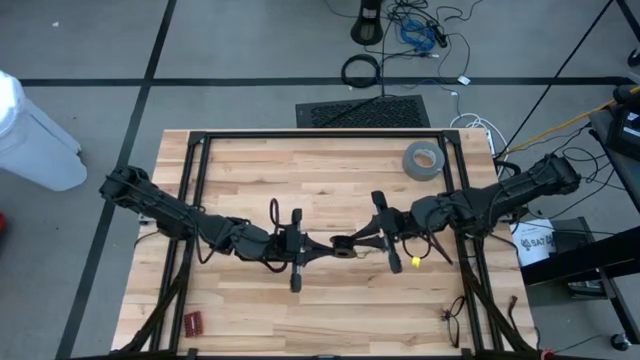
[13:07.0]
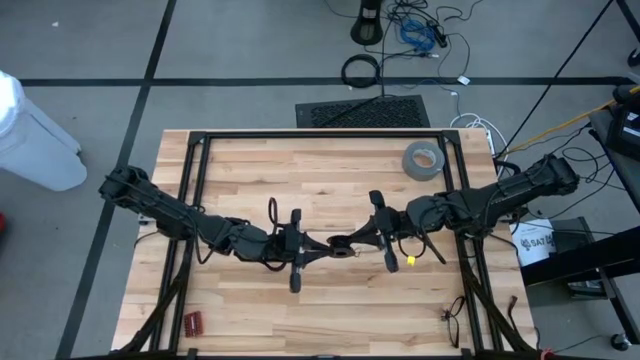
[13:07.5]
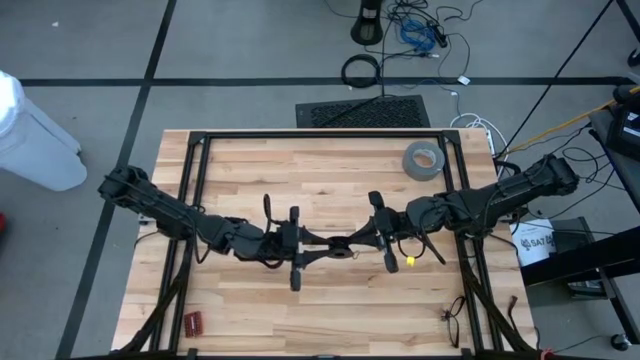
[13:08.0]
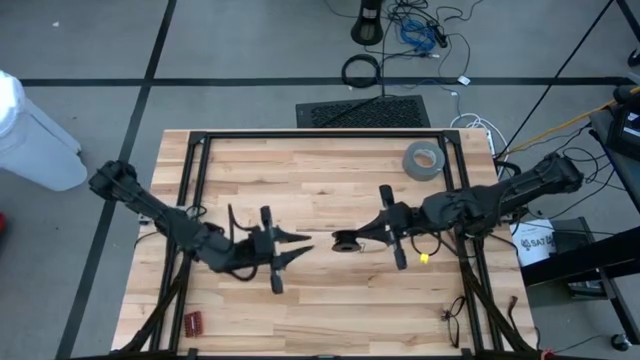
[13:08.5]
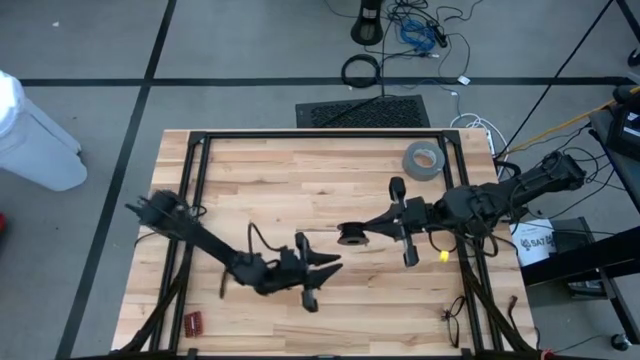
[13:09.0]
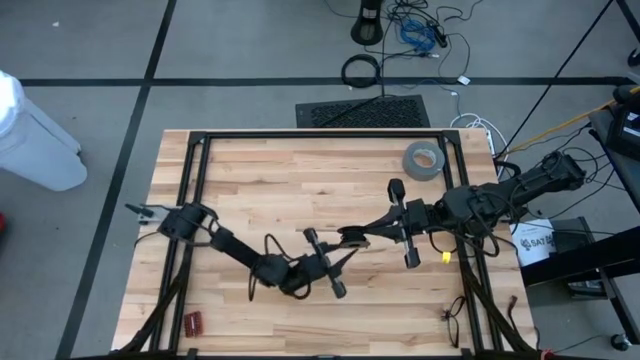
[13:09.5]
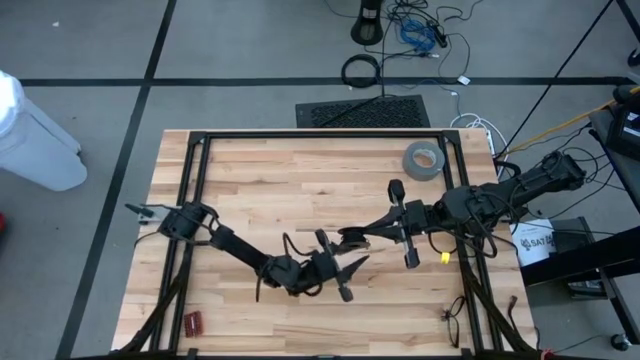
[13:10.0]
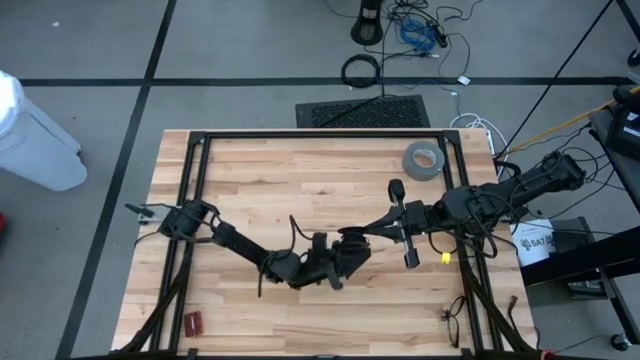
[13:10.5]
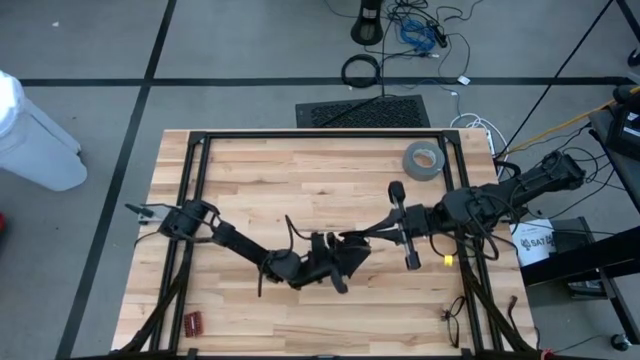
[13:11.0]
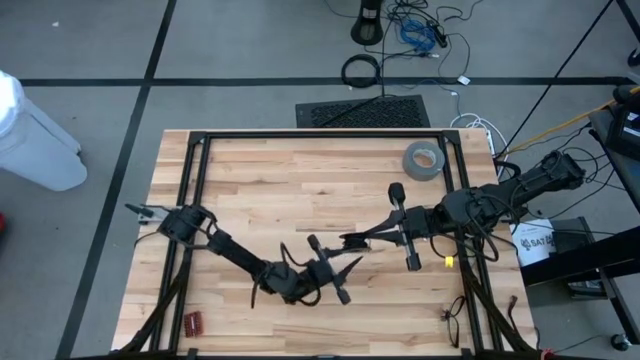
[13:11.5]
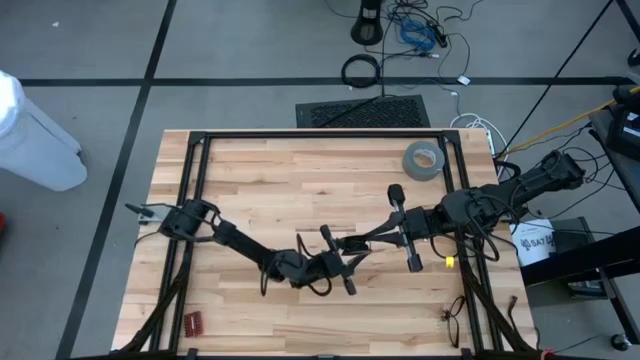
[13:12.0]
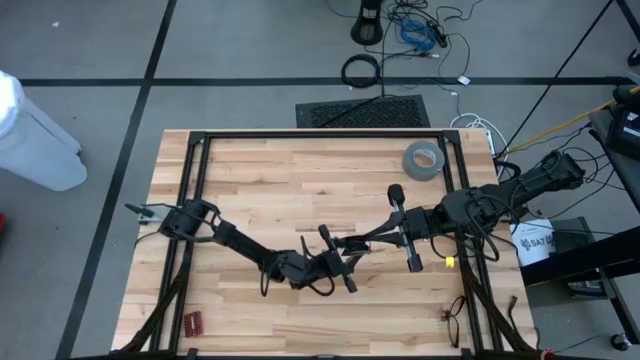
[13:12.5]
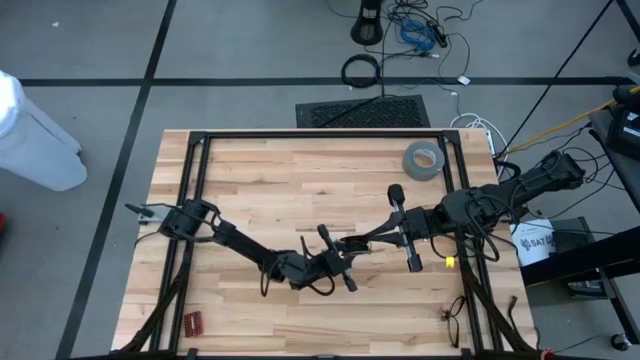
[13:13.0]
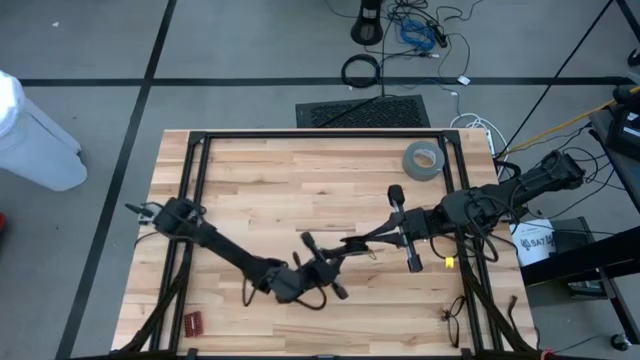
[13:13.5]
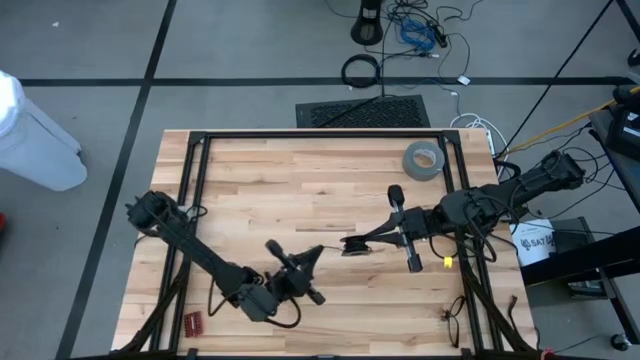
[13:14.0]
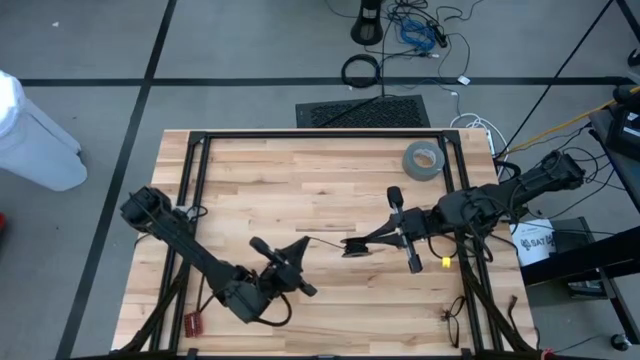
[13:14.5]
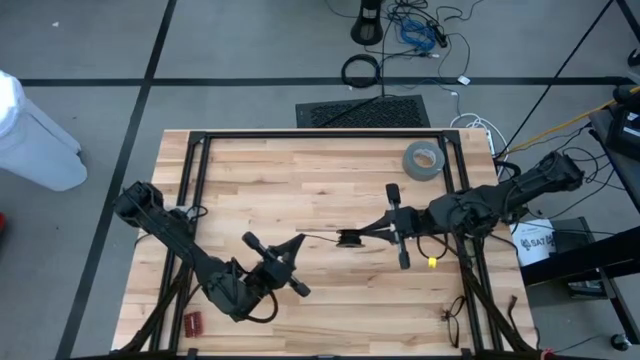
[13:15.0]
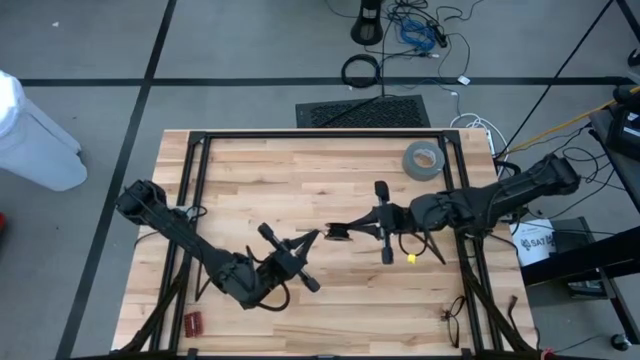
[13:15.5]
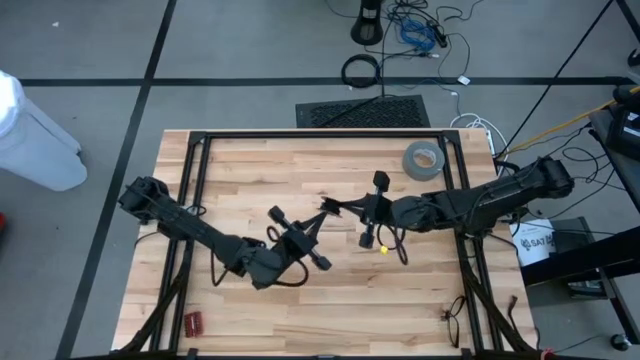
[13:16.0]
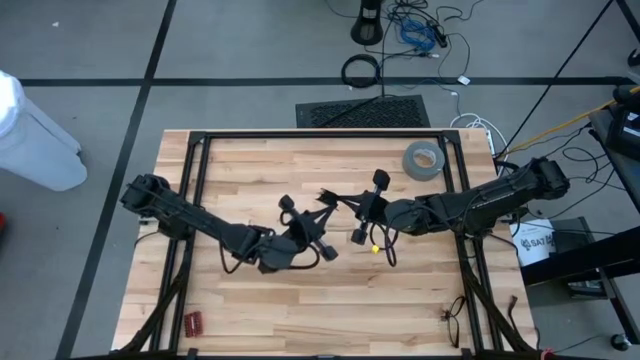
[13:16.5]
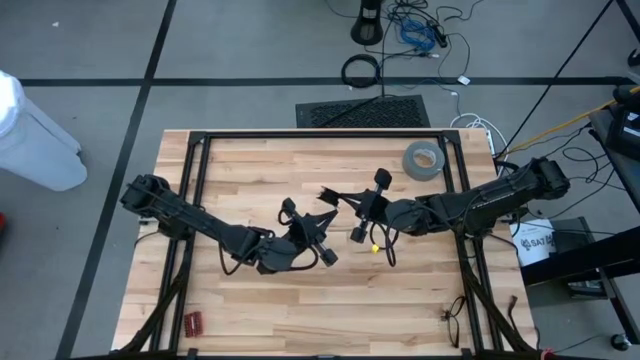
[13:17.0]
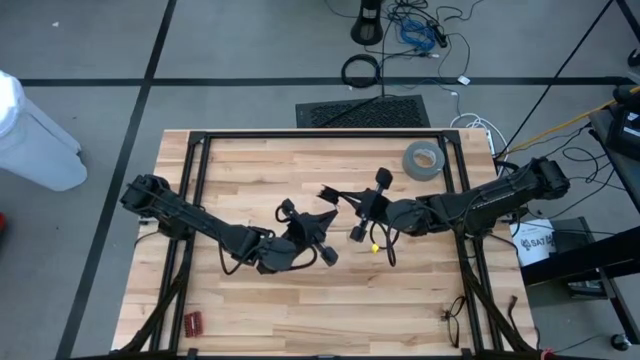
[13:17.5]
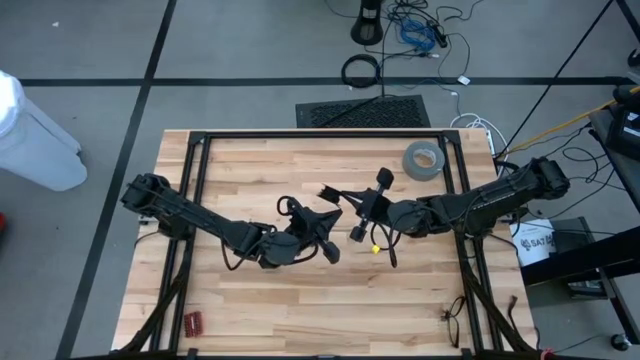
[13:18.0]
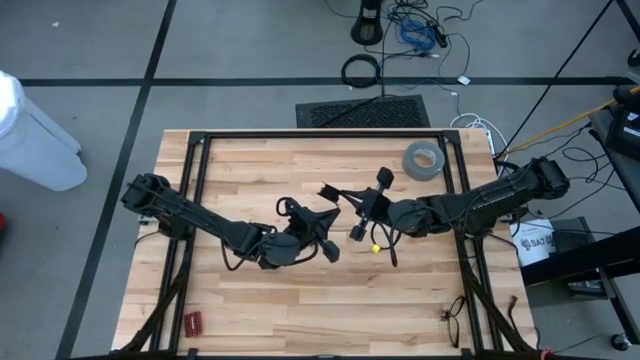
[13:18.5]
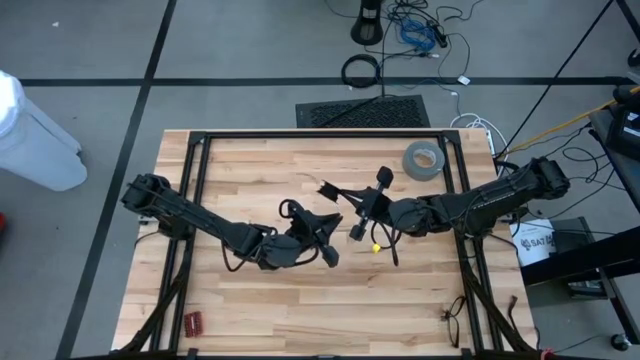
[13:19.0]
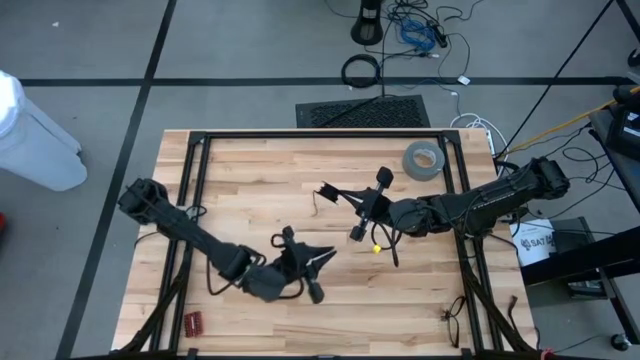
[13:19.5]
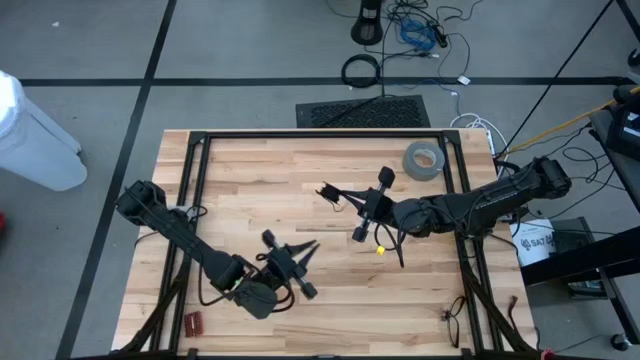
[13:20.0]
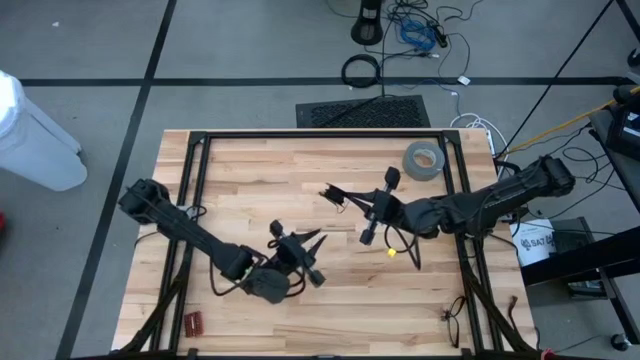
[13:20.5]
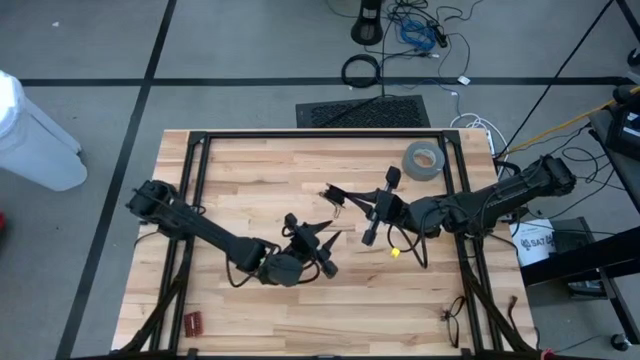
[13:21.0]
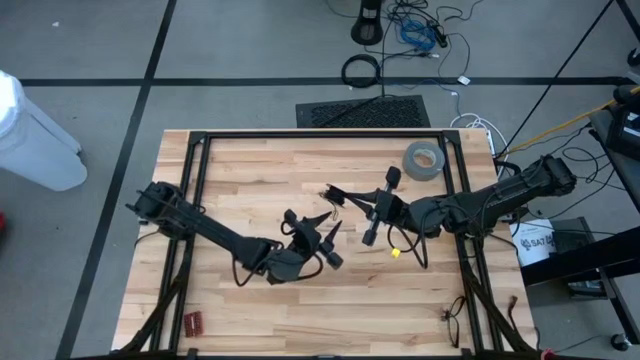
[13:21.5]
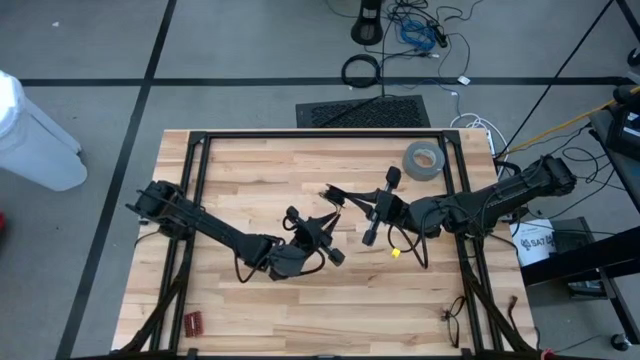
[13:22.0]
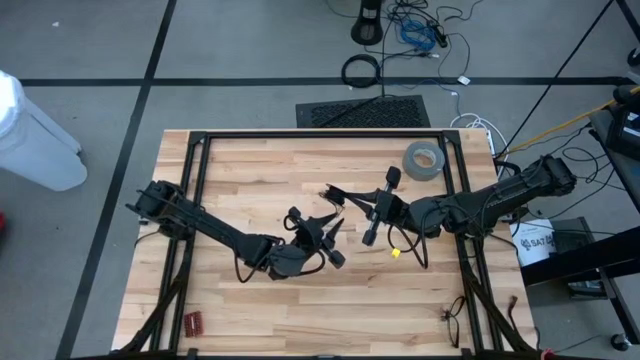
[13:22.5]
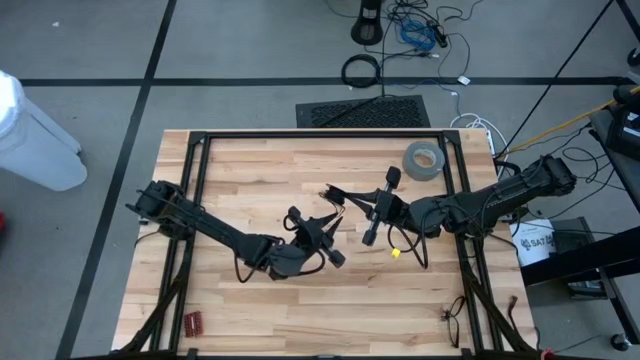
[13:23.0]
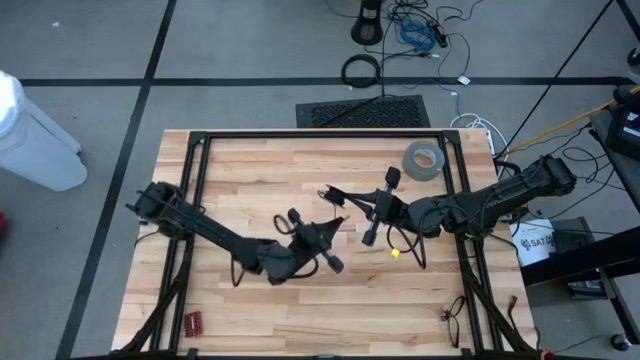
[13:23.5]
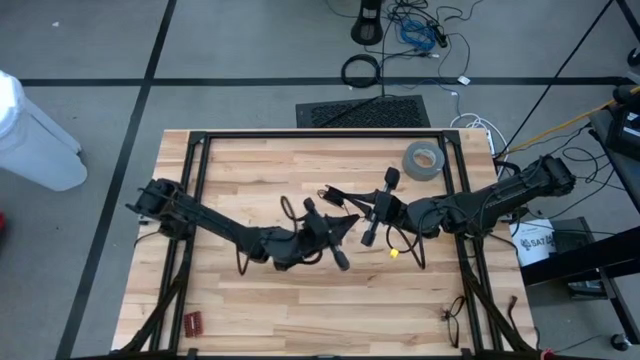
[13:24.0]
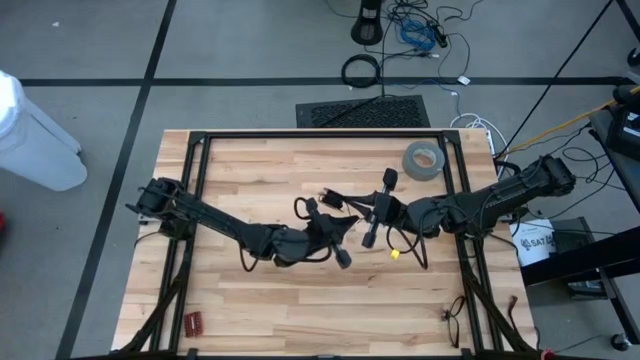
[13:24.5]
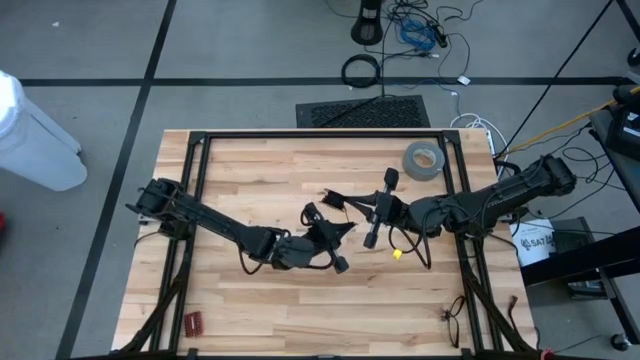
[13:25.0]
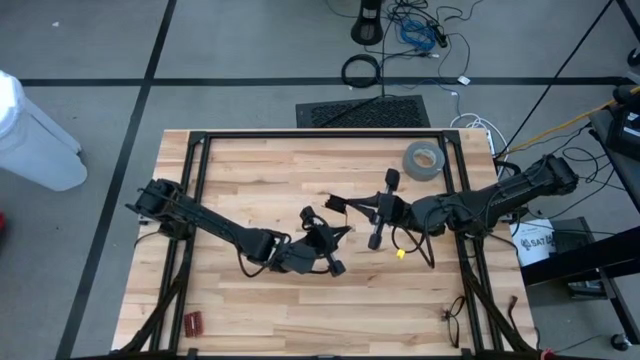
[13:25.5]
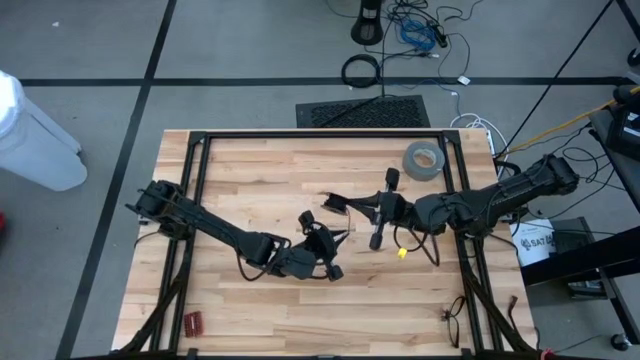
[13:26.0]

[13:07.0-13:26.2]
Task: Coil cords
Coil the black wire onto the spool
